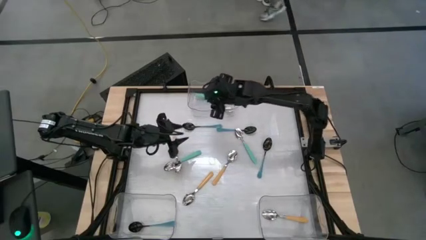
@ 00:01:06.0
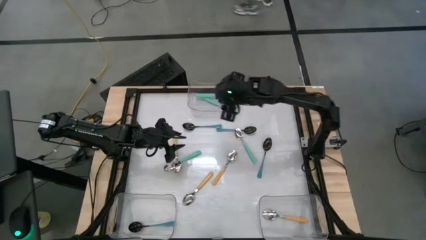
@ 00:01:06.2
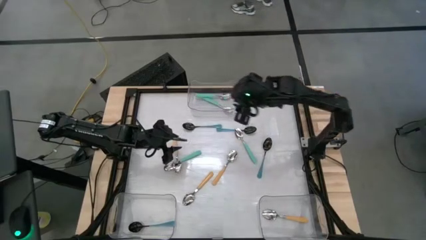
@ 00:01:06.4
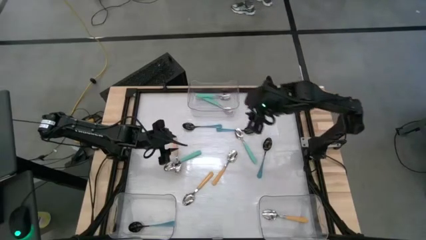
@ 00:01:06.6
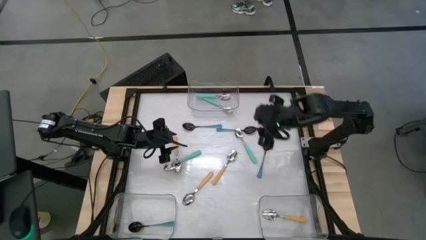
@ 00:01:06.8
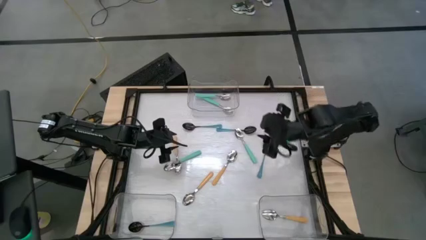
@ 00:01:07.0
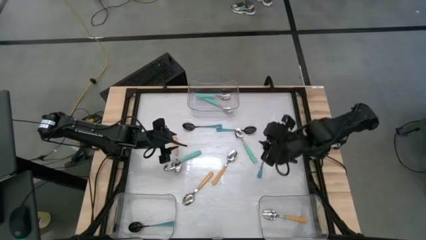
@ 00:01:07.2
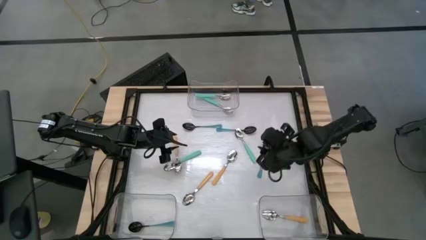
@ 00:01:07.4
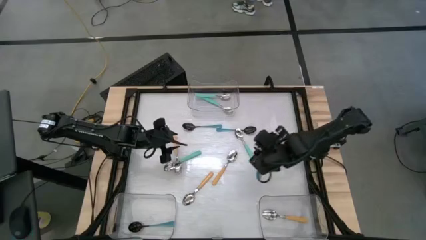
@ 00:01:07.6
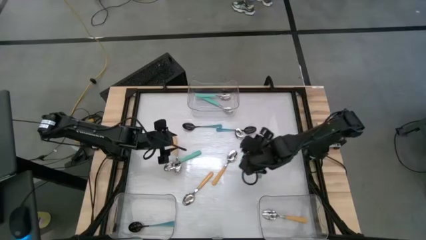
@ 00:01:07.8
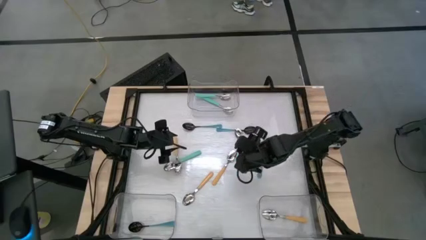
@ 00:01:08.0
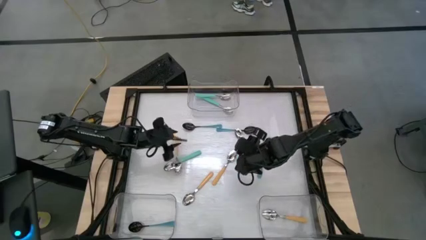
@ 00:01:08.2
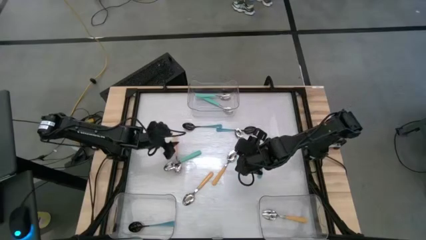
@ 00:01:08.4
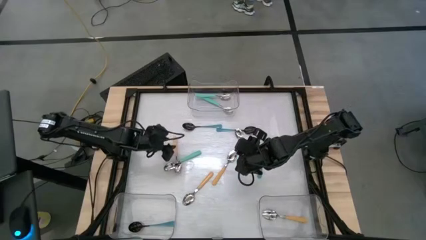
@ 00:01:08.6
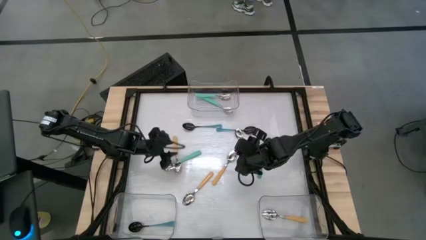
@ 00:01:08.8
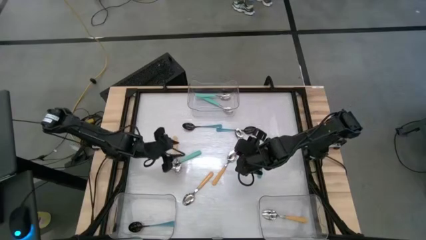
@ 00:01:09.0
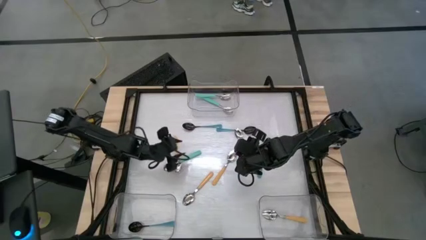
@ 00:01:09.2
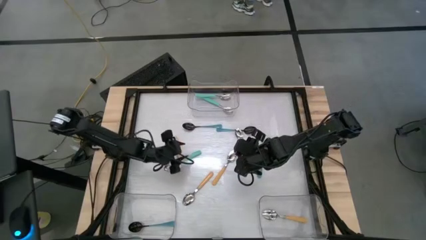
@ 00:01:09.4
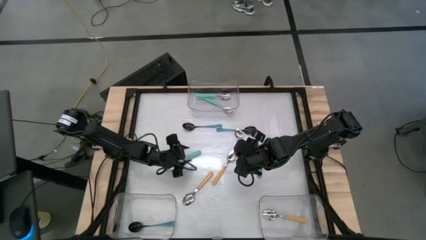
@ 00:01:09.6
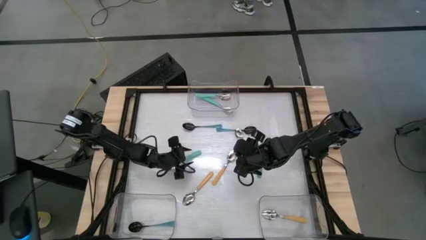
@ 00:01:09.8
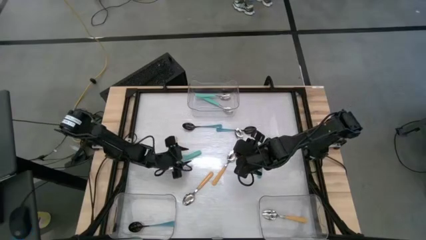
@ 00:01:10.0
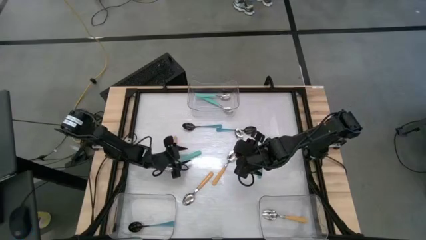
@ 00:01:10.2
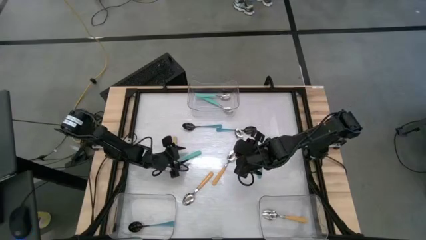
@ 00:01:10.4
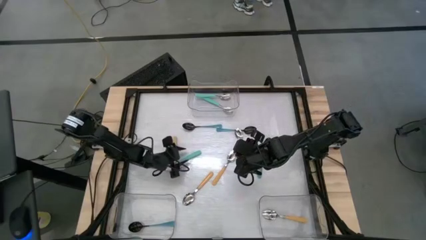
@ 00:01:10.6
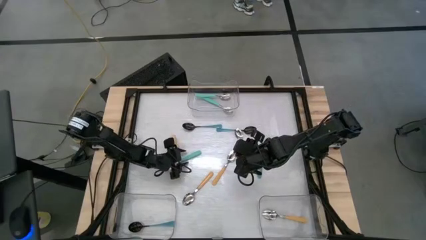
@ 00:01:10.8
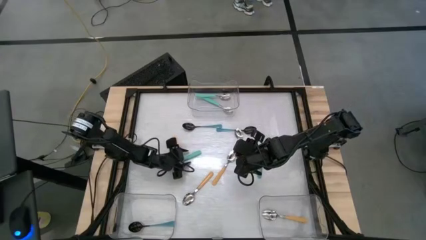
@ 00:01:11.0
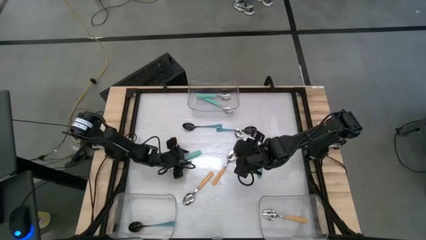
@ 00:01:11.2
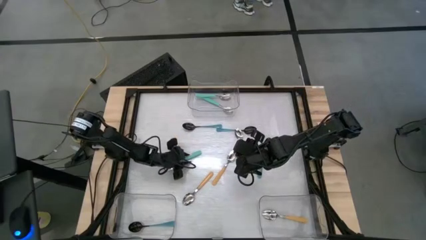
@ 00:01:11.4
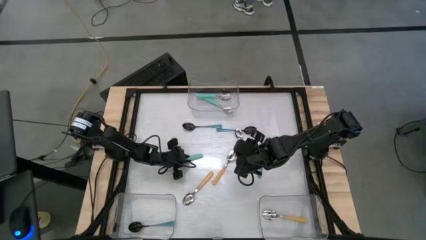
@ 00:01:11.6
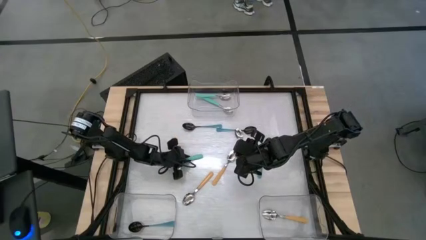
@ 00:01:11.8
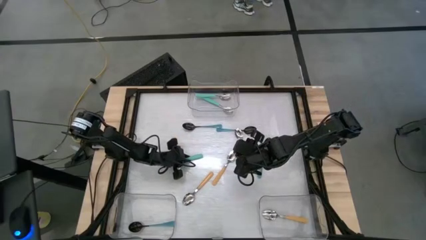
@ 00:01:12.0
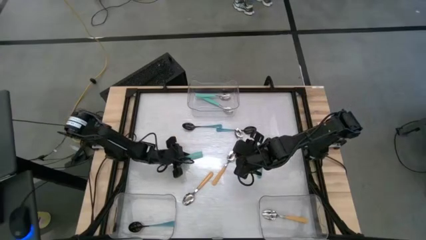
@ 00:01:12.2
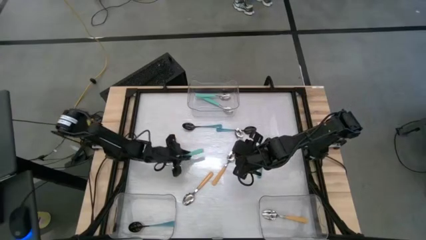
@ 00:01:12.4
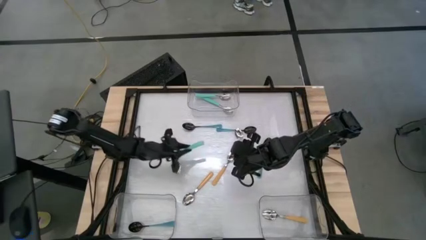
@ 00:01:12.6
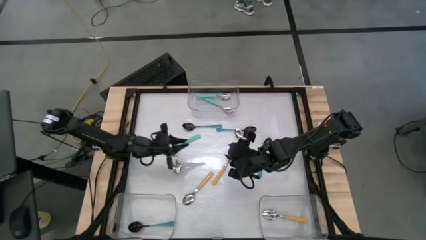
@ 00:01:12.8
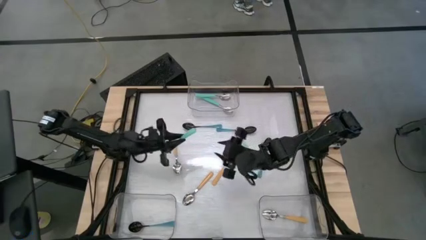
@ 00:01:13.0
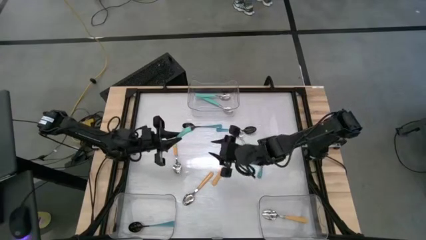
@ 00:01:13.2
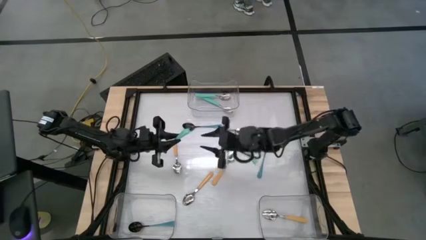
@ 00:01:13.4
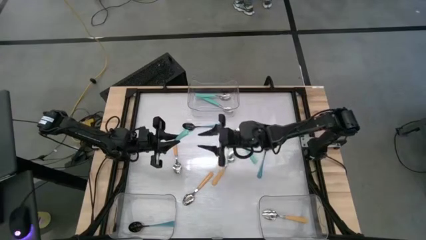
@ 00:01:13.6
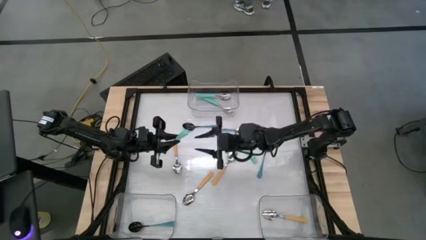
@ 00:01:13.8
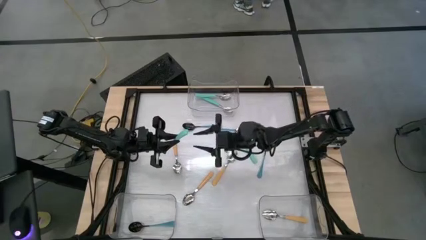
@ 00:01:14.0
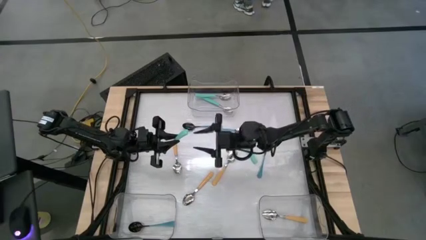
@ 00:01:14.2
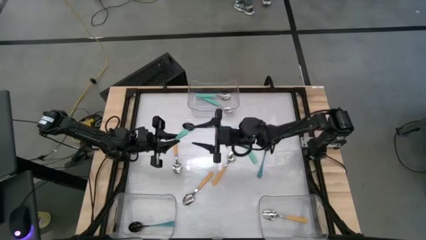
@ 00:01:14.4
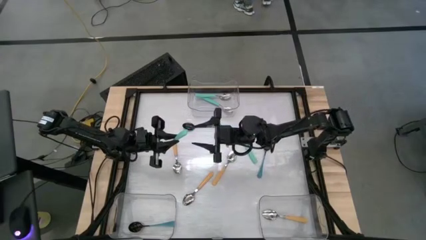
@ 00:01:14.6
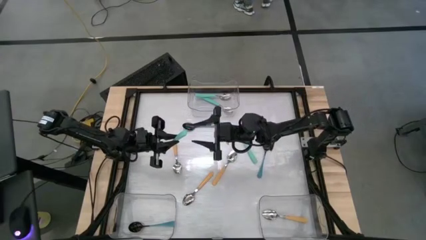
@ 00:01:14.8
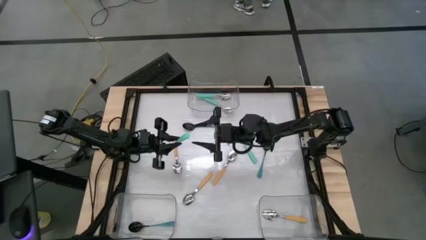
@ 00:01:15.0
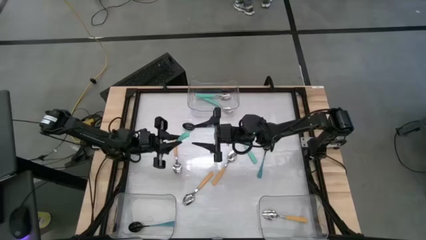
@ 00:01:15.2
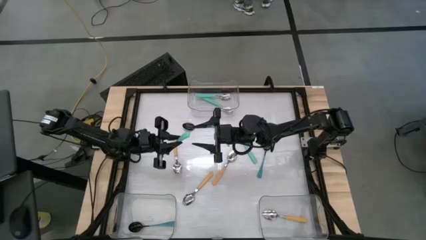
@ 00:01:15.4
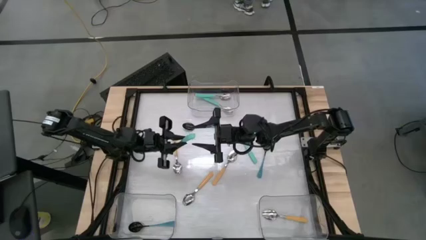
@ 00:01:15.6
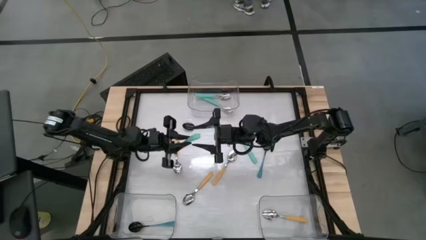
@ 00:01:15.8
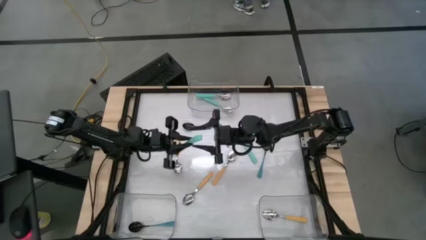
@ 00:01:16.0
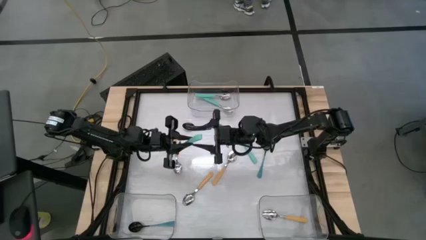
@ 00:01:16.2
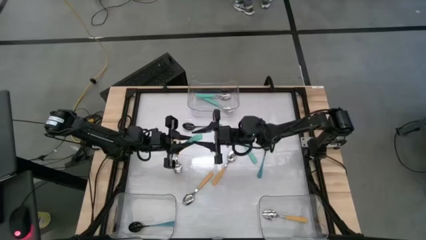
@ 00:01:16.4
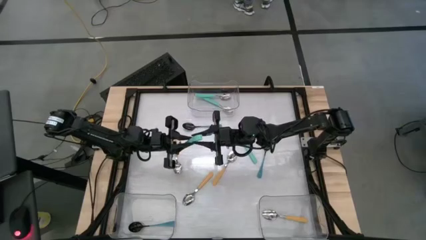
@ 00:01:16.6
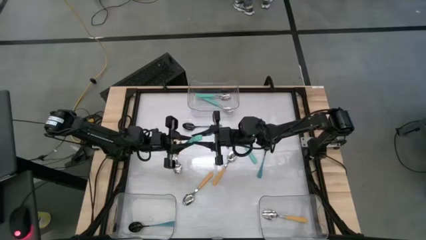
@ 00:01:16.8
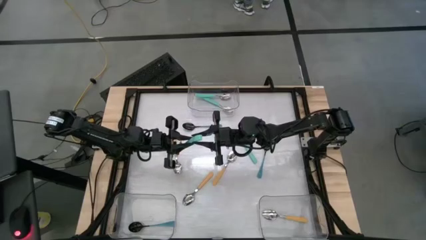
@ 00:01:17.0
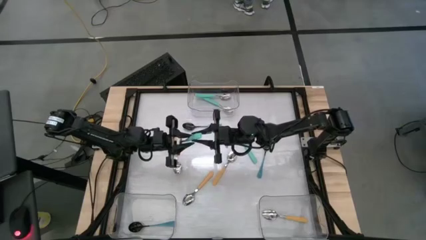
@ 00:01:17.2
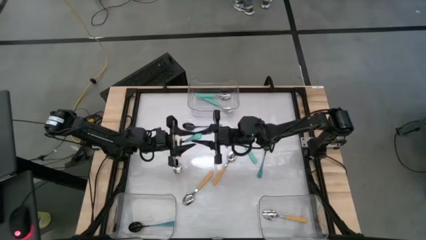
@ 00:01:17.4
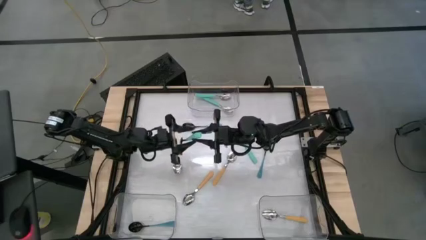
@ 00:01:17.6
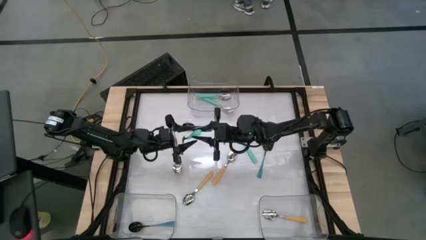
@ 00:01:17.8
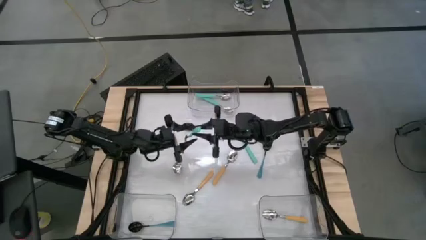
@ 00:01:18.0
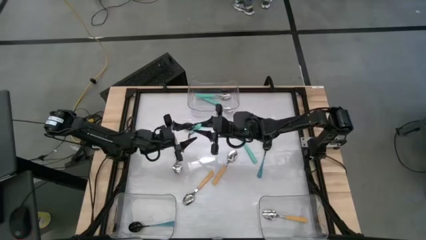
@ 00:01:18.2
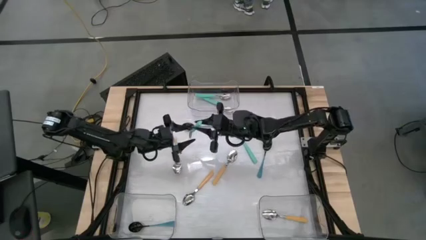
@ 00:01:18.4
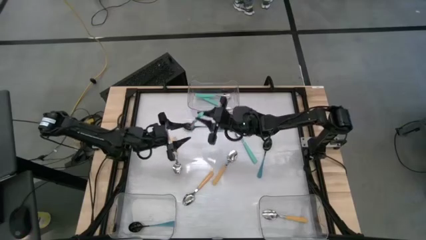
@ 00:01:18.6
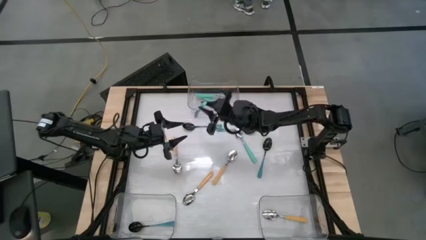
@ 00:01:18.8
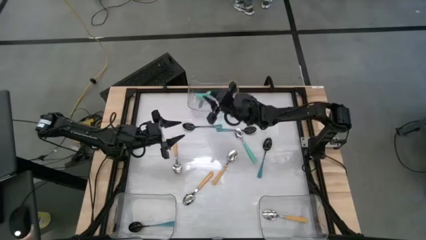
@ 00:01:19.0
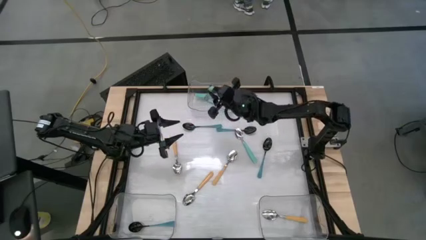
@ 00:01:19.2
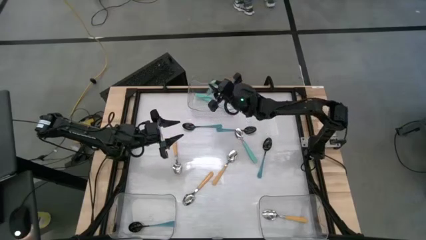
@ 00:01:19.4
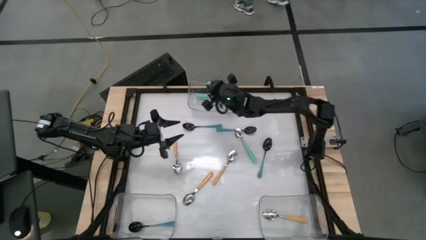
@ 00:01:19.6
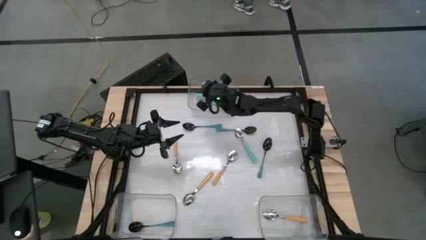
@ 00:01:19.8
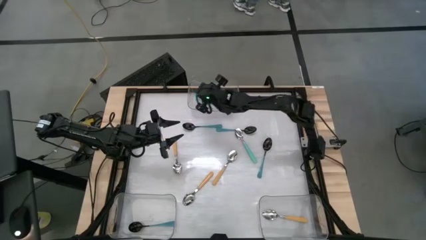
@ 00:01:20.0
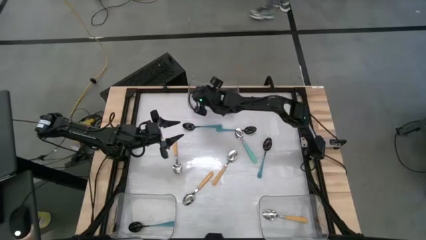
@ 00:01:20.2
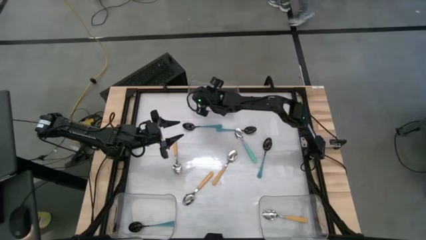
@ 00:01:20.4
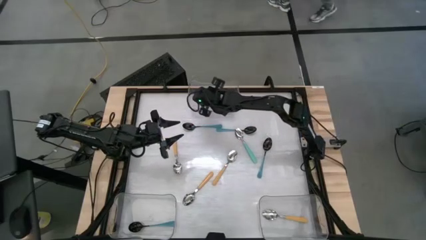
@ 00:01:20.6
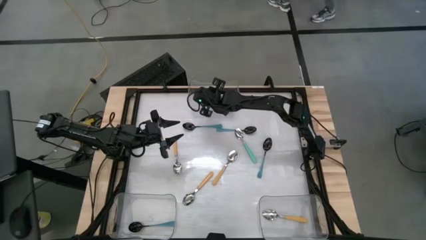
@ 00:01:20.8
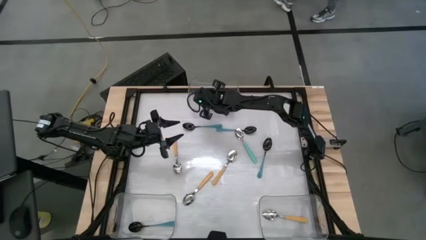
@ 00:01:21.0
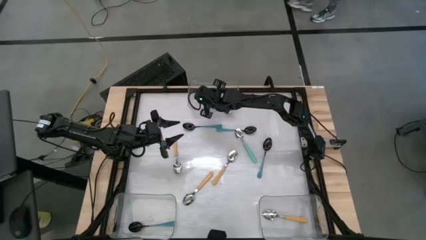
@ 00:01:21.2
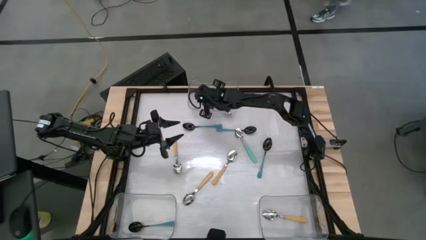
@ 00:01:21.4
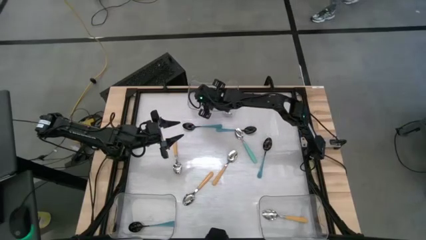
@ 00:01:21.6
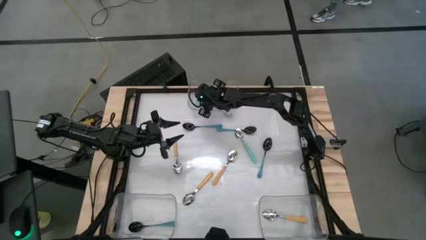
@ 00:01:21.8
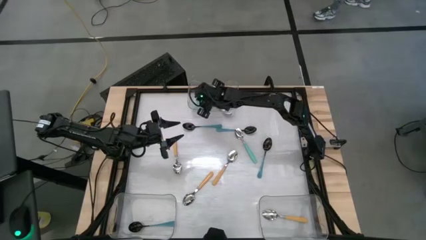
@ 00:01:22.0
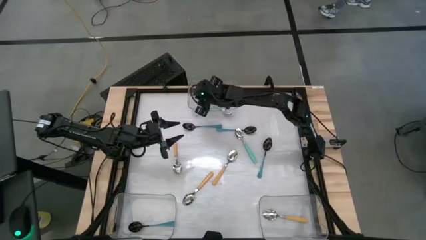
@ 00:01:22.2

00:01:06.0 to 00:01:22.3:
Task: Sort silverware by color (type)
Put the left blue spoon into the top transparent bin
